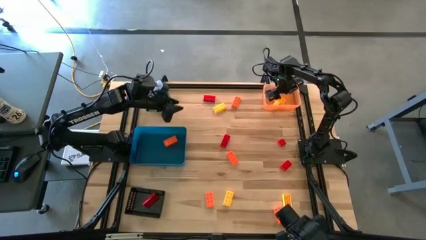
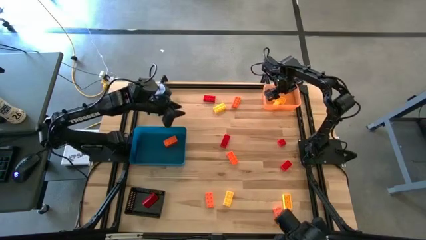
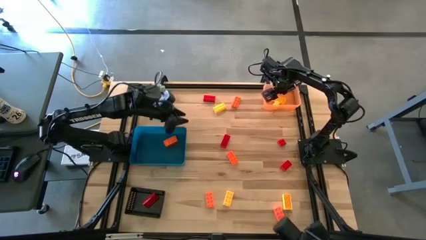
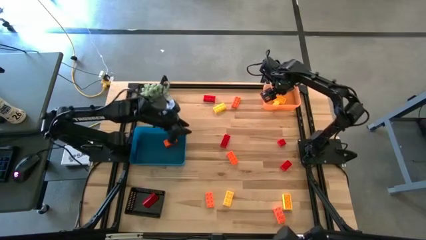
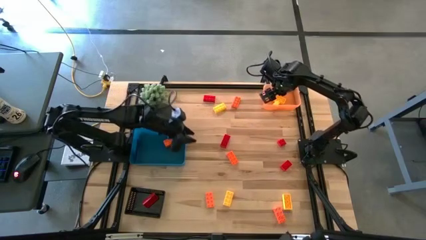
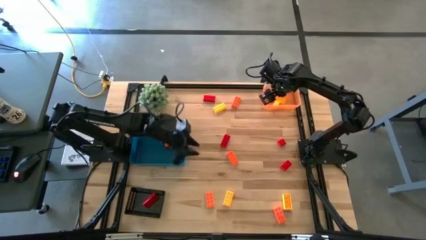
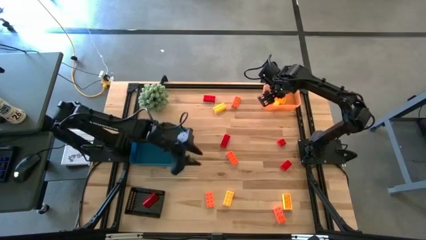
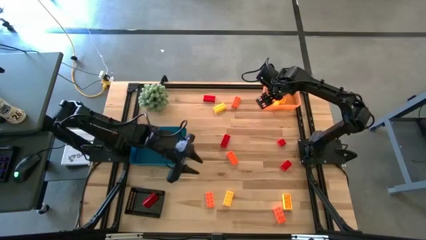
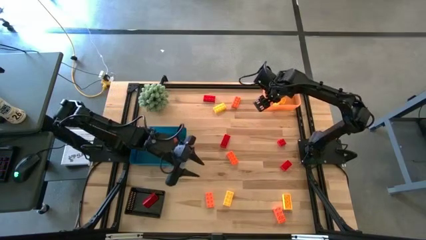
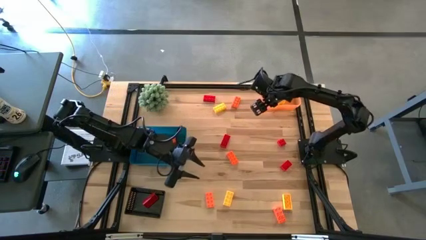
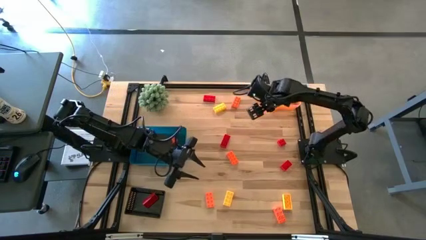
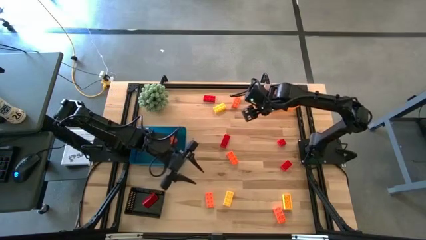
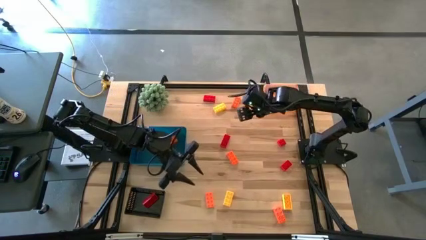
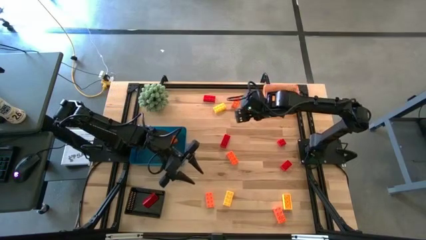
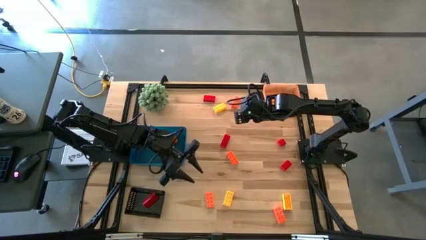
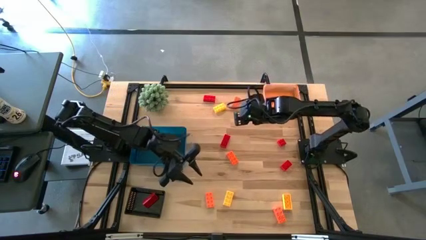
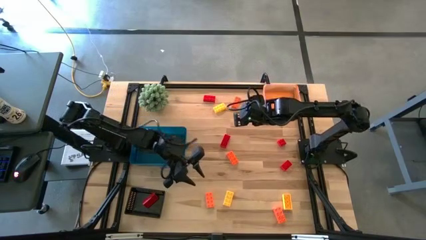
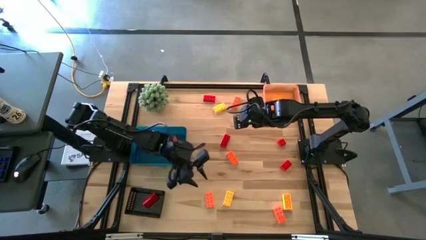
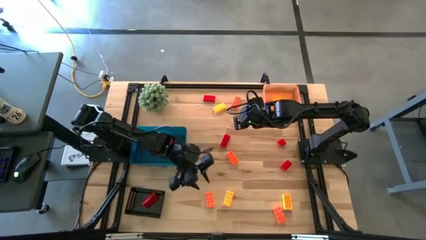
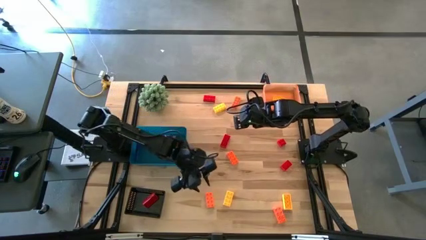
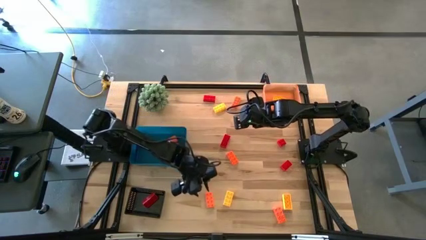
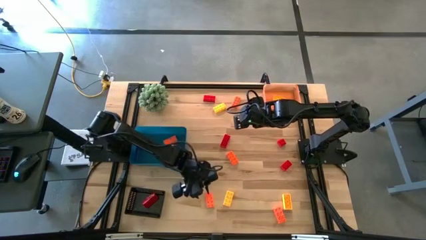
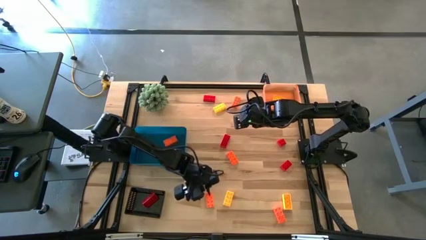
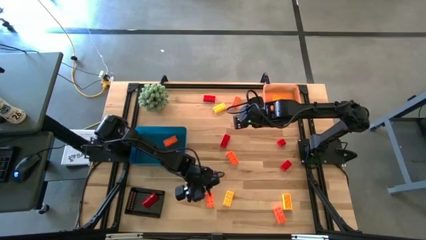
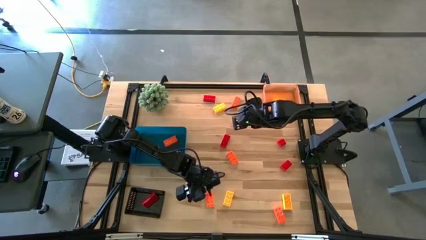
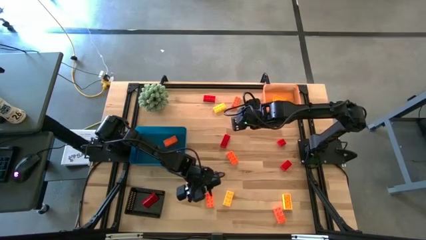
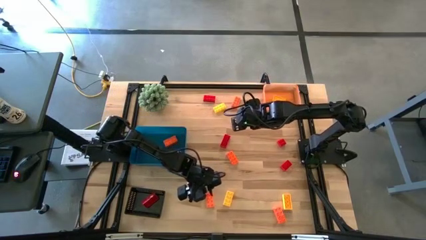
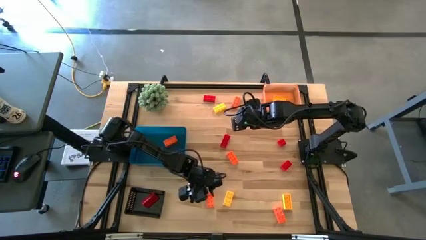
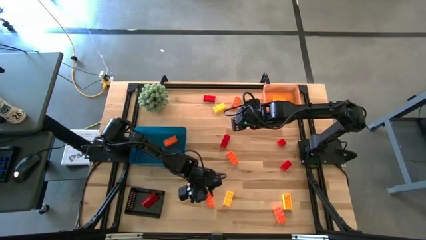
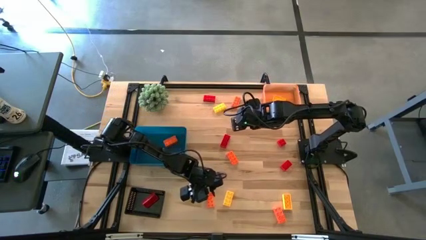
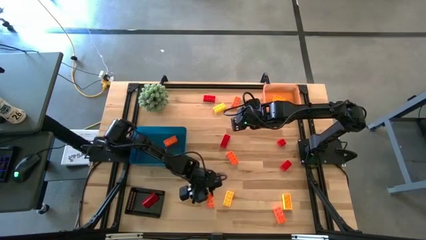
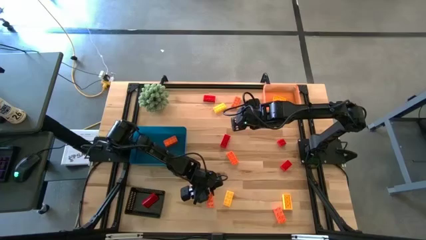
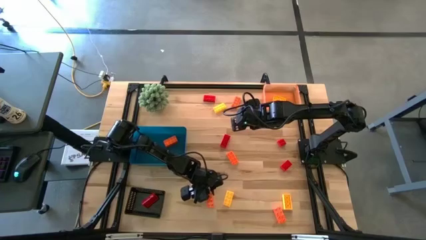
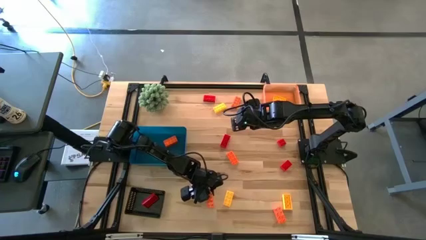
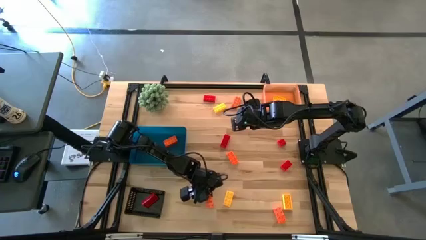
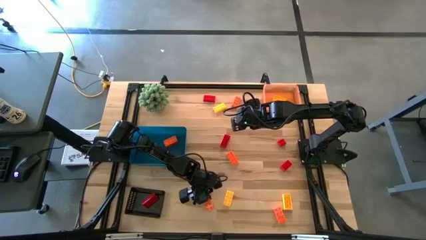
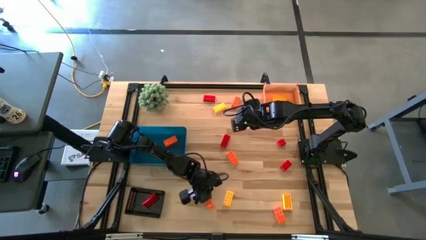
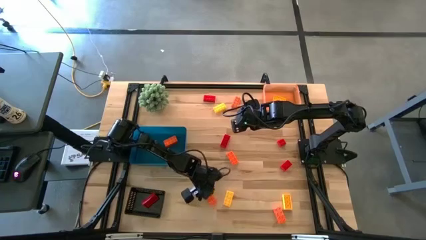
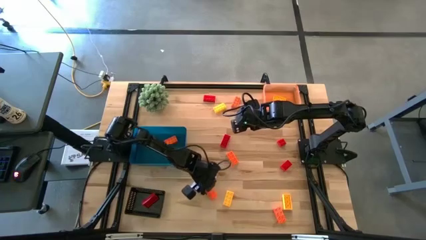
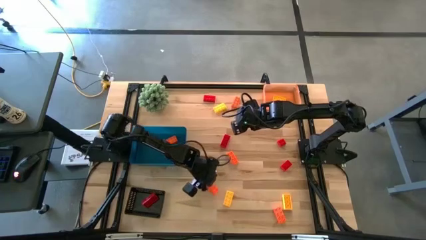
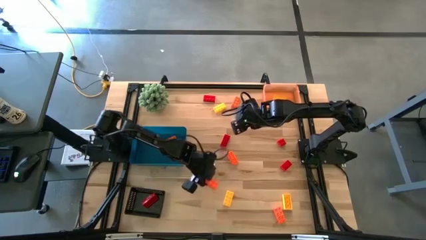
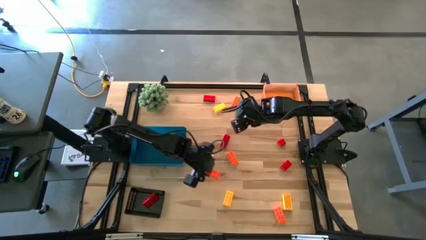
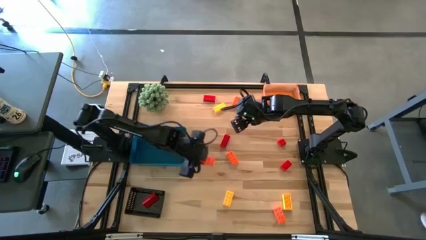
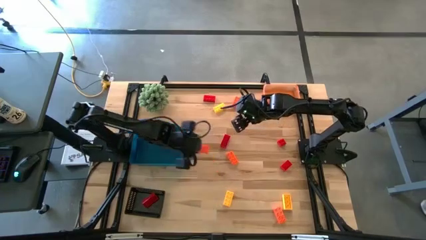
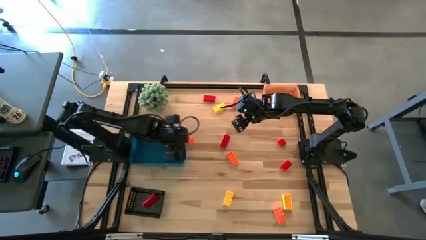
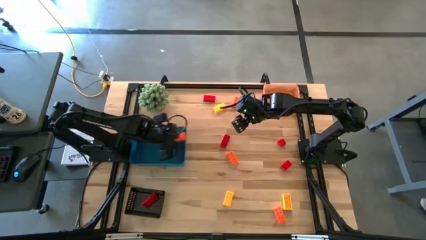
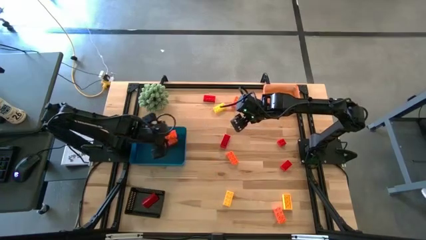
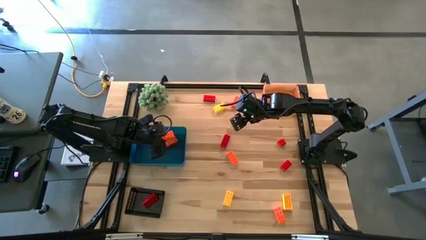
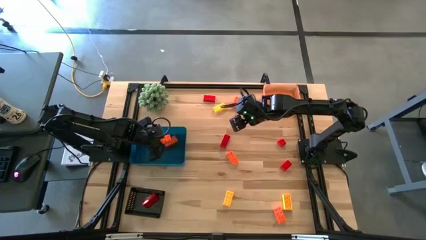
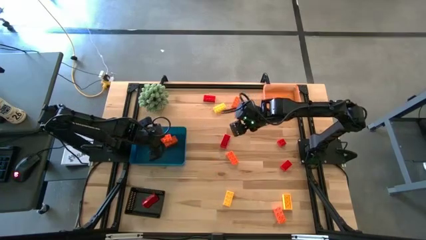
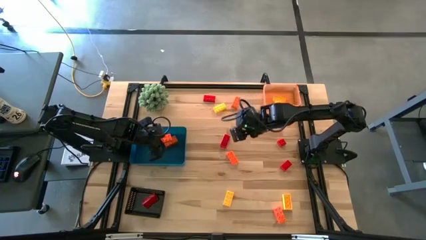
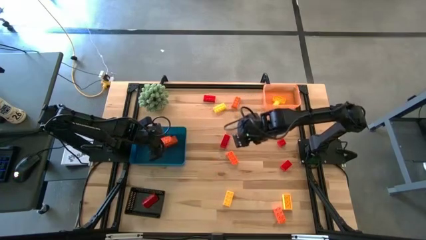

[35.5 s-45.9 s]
Task: Sort & place blocks by color
Put the orange game piece into the blue bin
